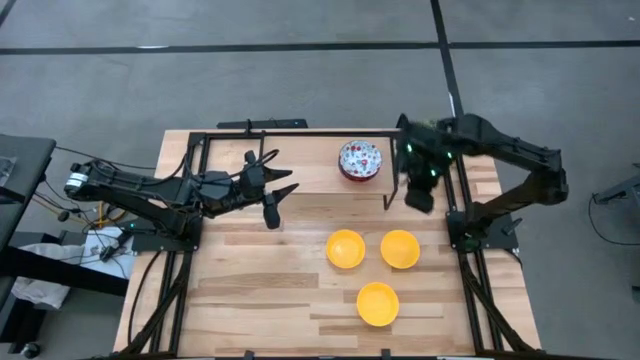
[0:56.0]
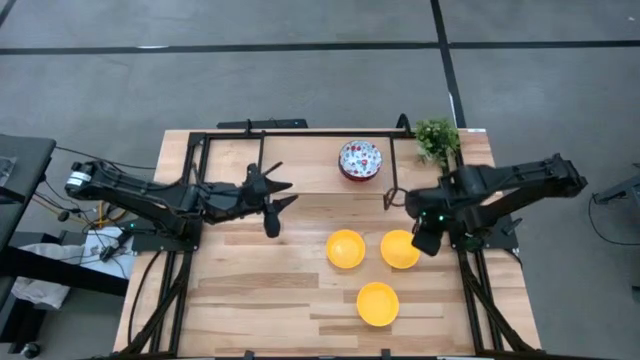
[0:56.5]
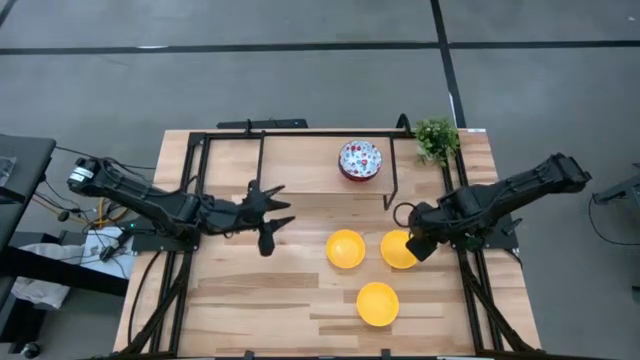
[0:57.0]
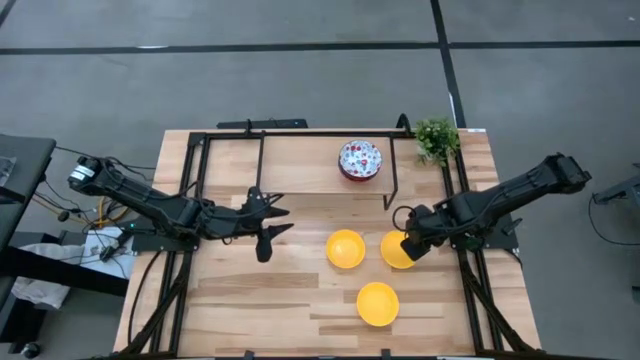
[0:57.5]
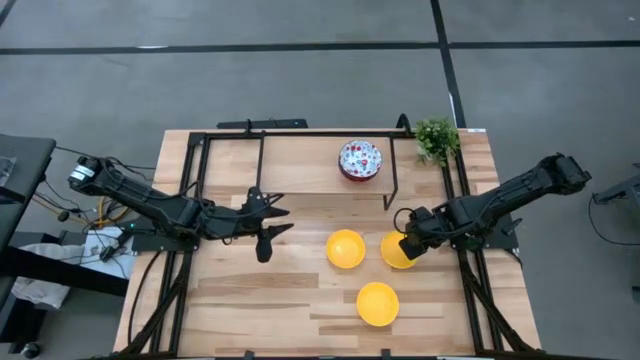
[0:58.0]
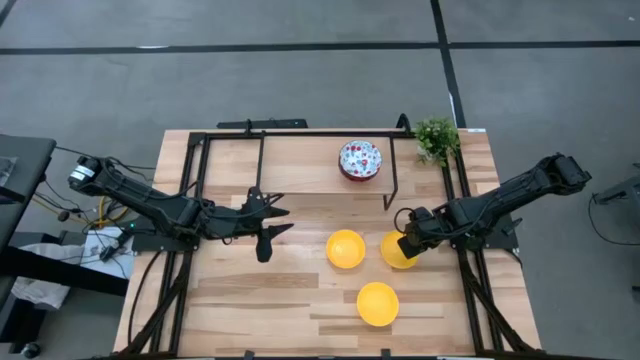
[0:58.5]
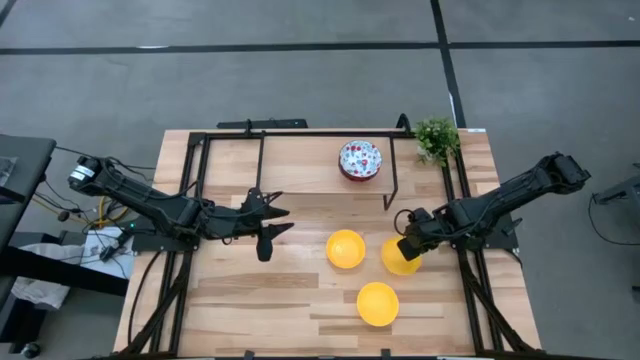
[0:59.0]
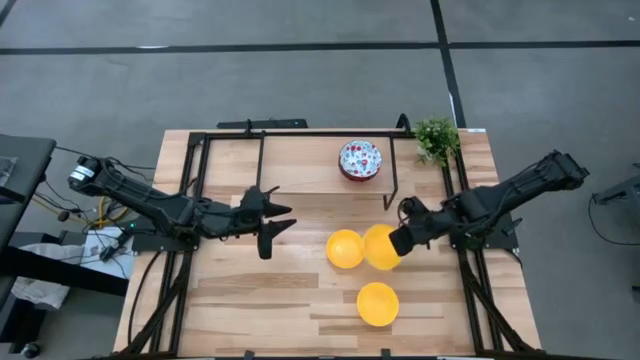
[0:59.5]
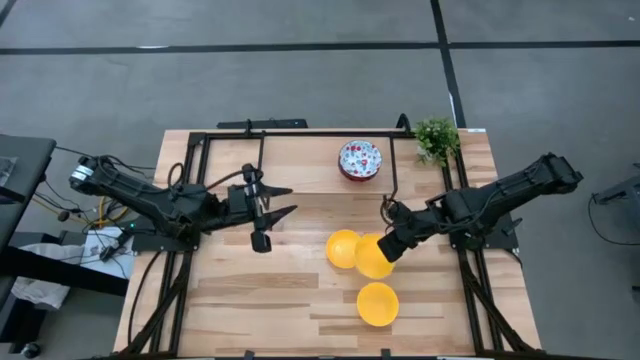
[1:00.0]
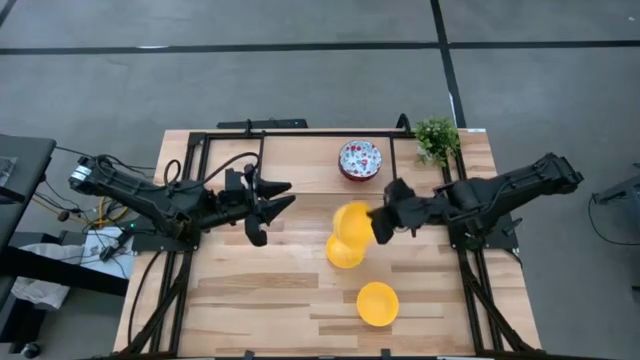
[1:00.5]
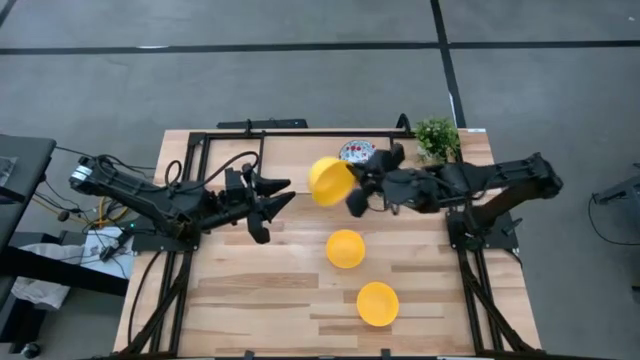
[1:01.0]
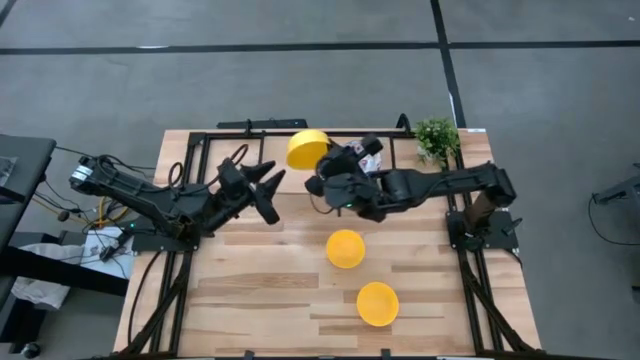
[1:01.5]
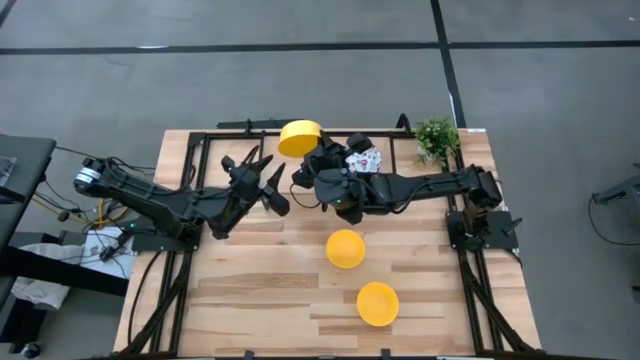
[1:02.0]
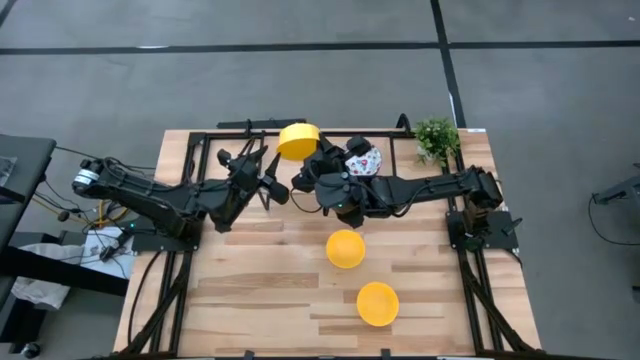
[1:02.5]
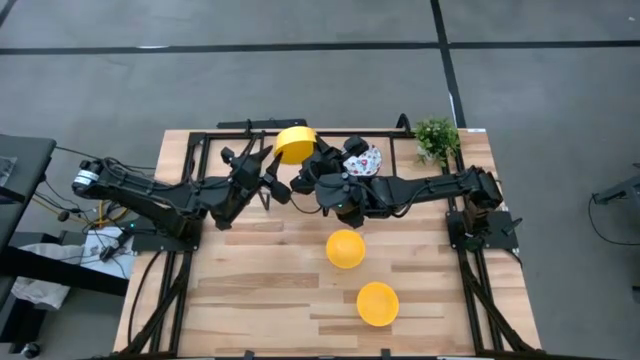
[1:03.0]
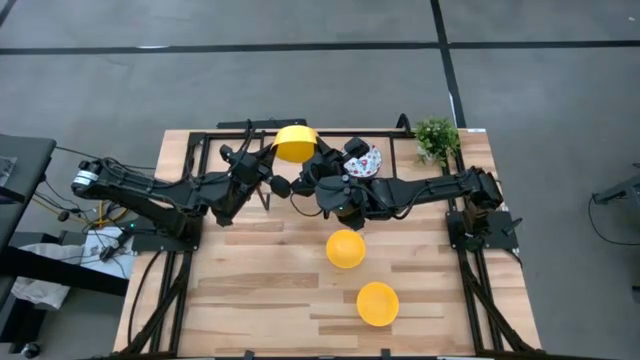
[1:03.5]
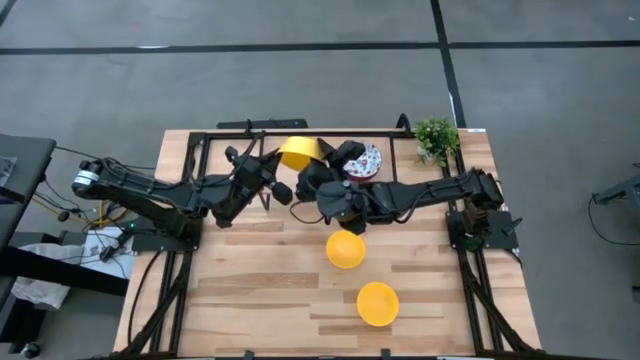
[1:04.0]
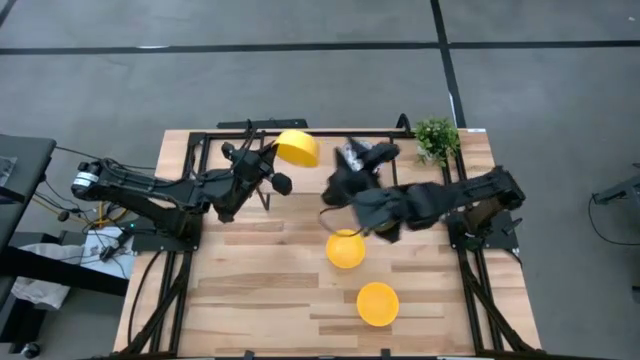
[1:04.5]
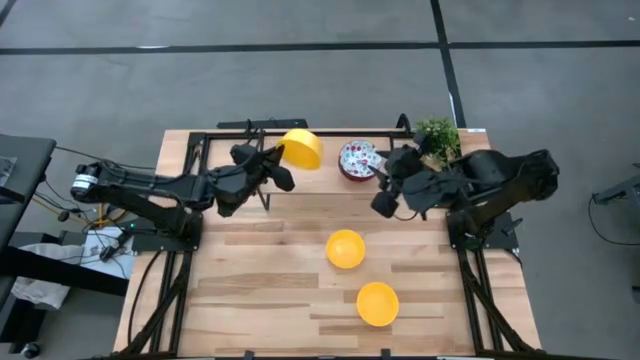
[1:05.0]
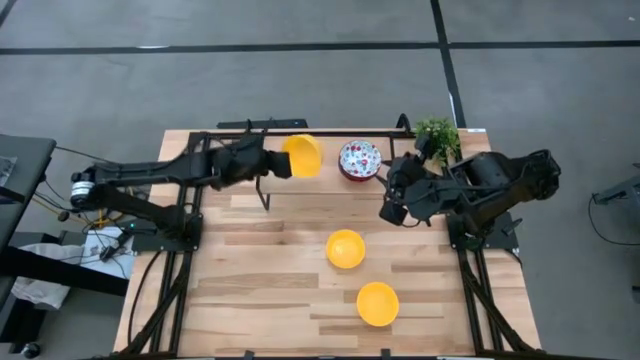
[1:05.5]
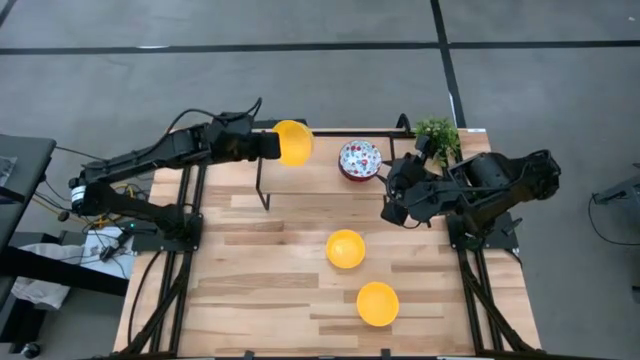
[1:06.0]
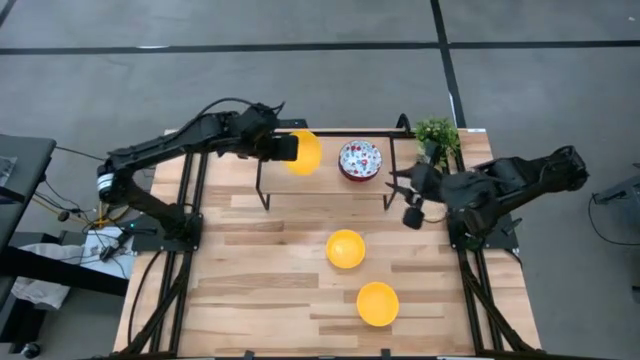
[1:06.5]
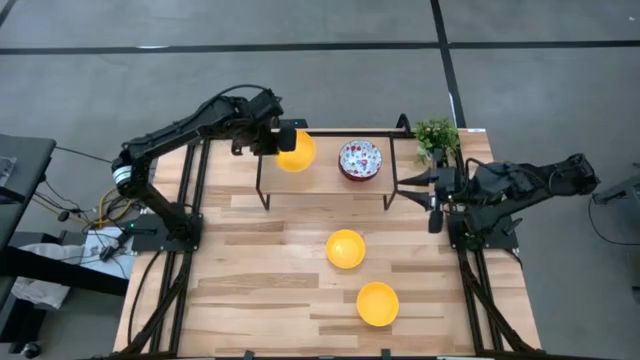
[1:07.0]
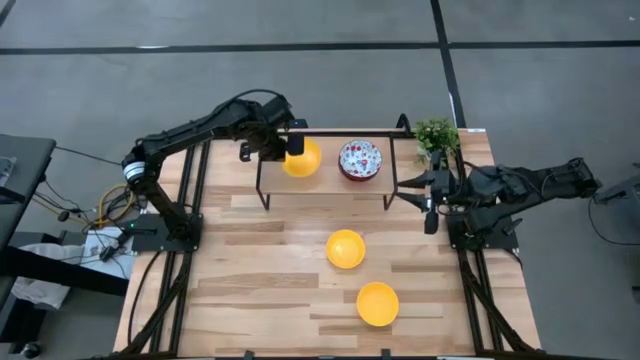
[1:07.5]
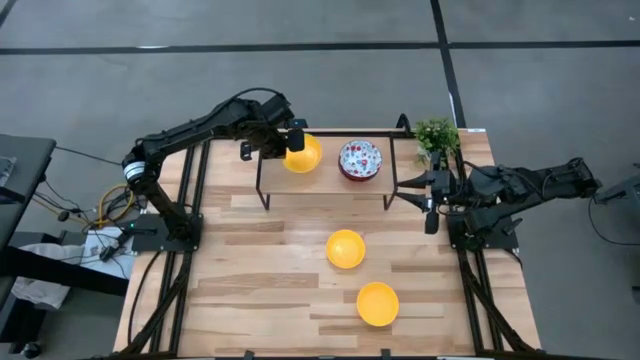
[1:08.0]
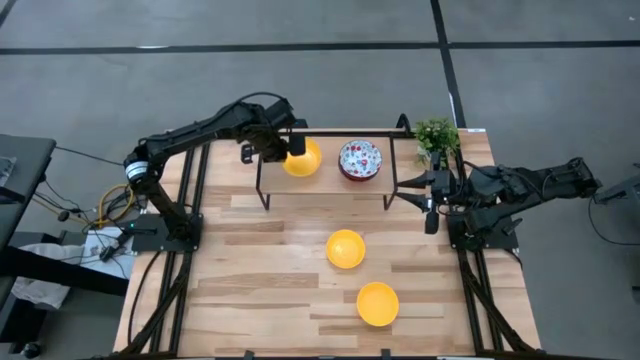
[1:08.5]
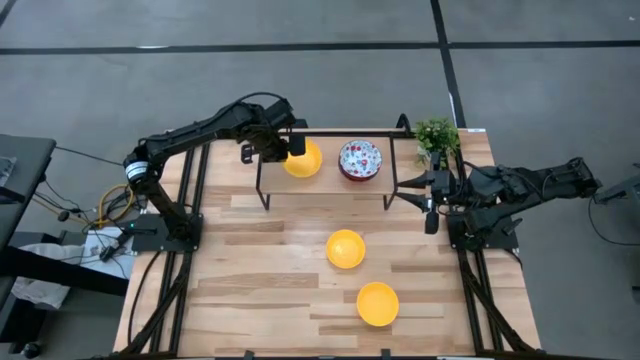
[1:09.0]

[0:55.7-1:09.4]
Task: Pick & Place Mini bowls
Put the right yellow bowl on the shelf

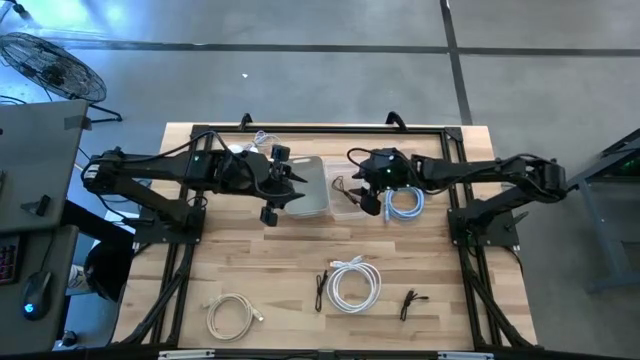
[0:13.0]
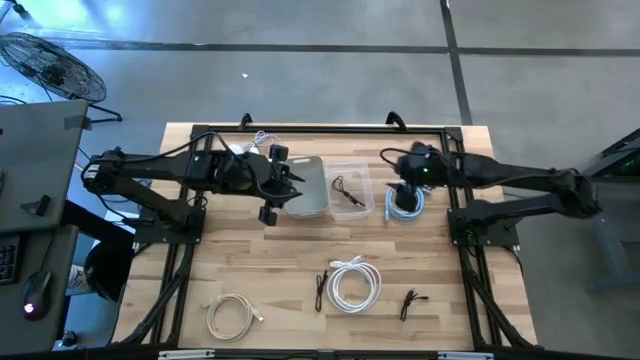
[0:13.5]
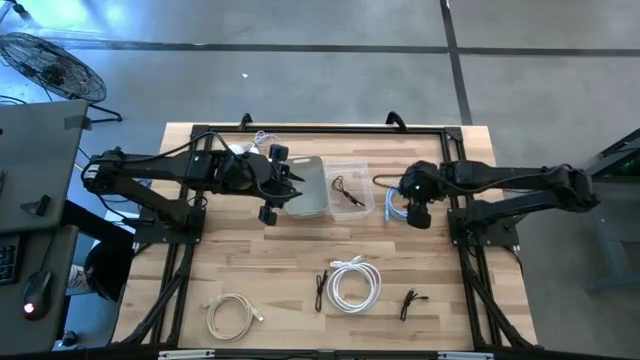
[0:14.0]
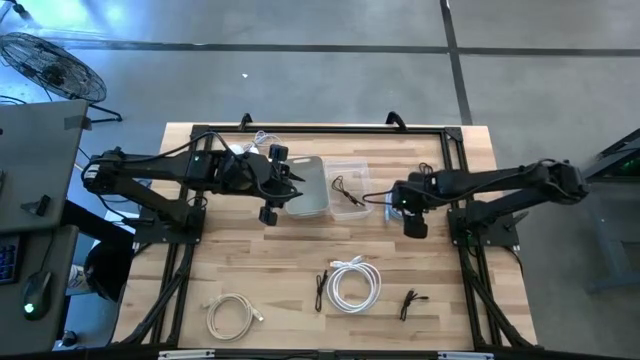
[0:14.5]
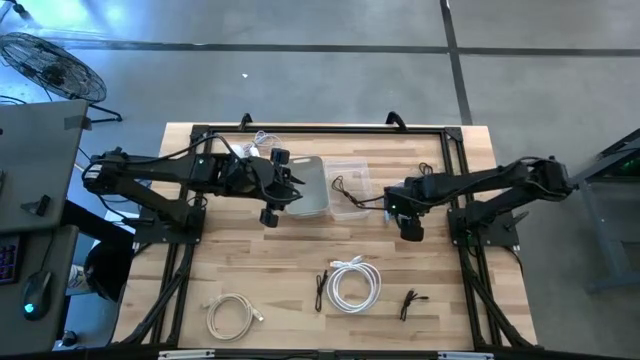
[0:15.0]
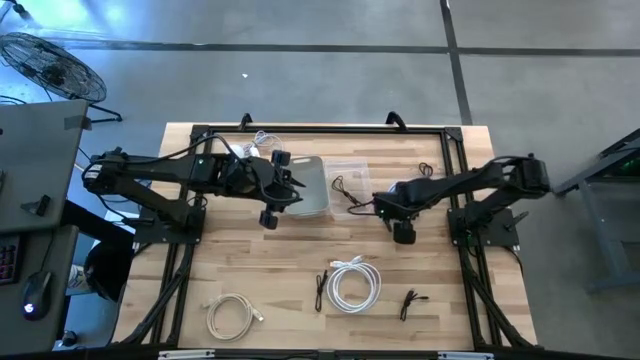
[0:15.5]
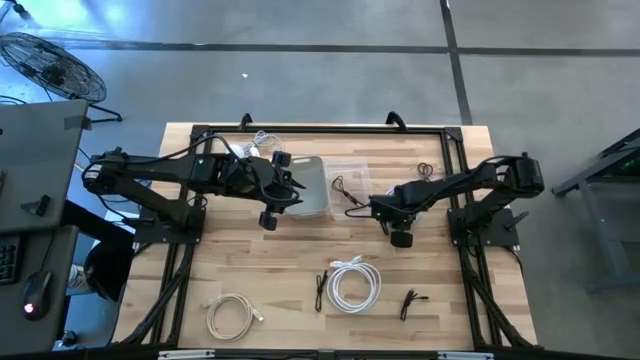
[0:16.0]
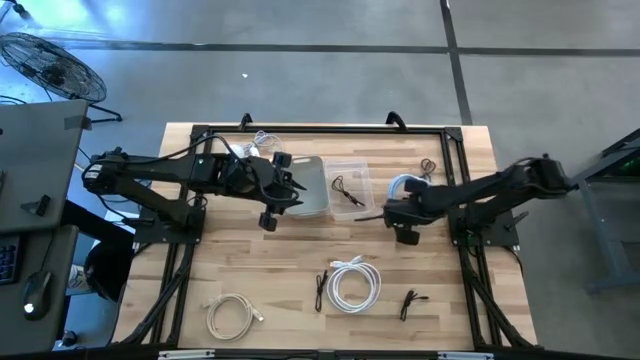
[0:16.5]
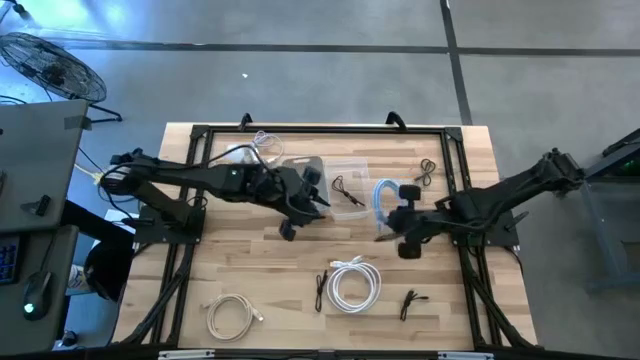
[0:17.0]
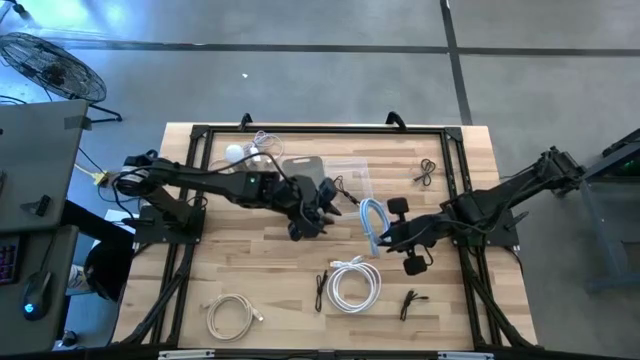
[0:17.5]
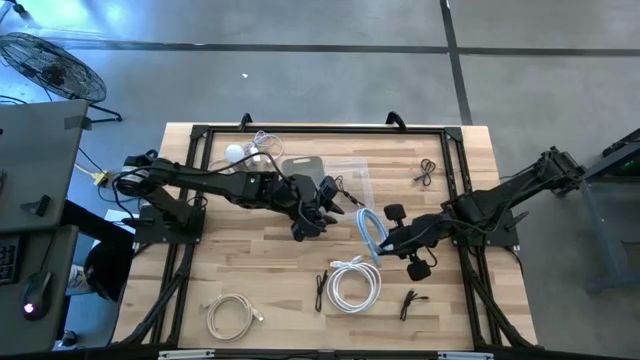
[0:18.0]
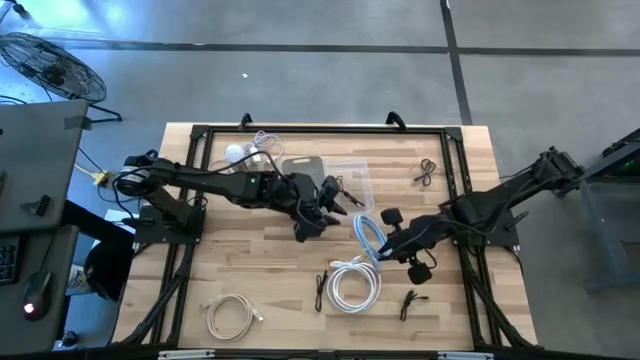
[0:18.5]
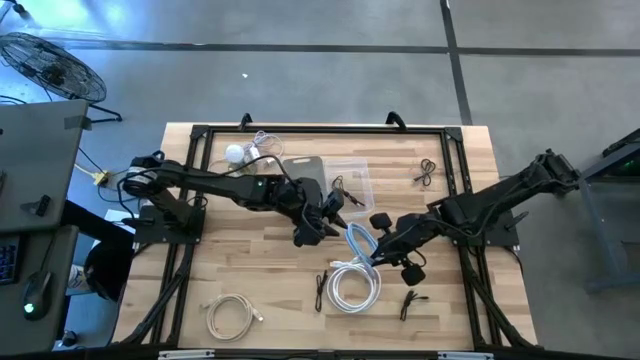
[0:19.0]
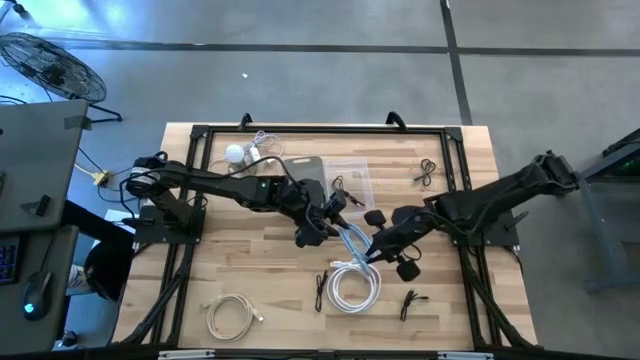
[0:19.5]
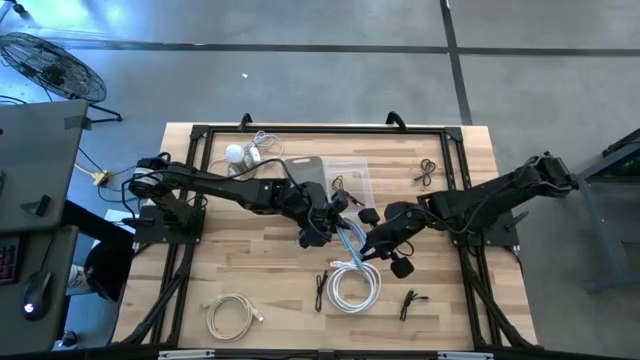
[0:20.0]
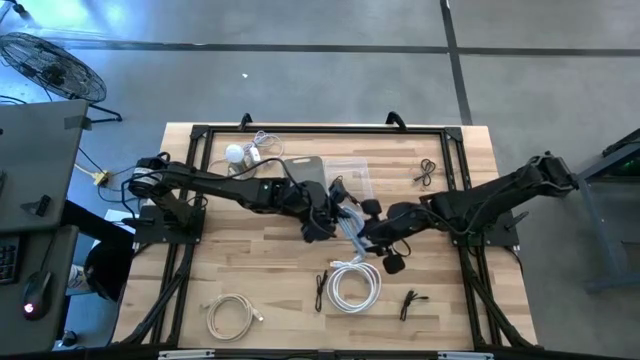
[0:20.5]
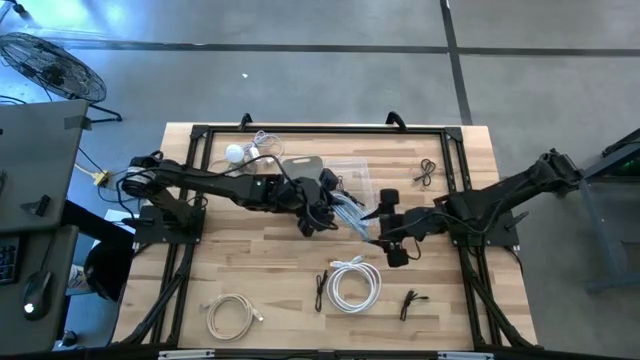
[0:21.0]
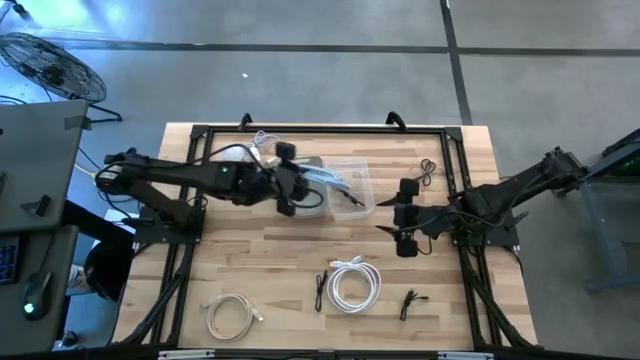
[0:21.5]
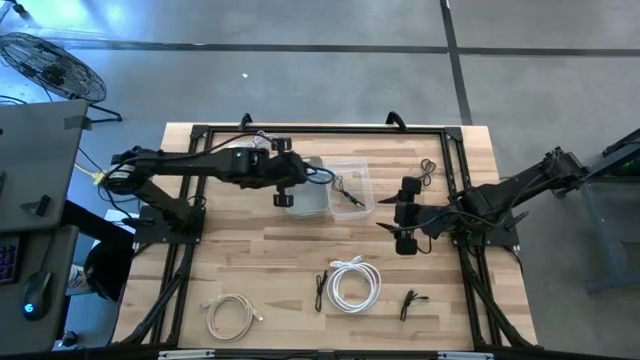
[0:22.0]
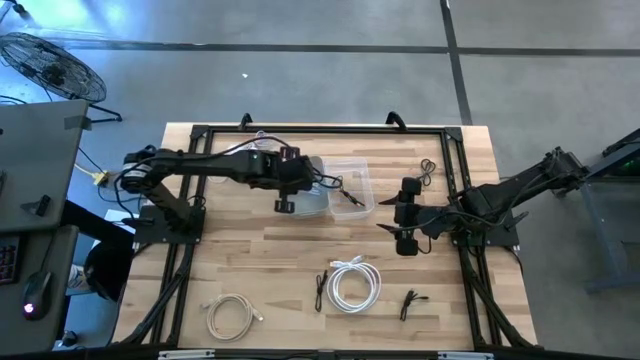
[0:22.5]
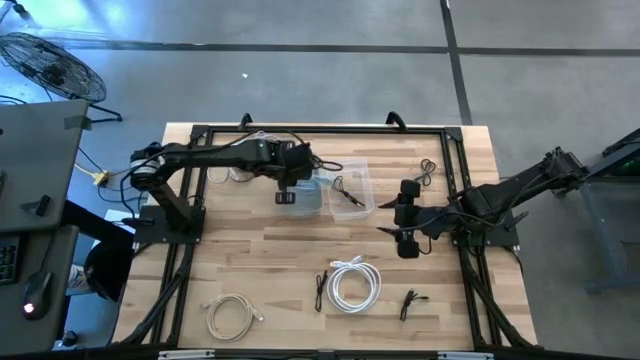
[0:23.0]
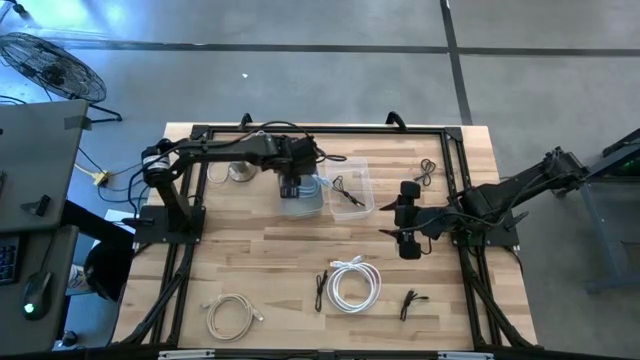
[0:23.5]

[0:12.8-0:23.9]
Task: Pick & Place USB Port
Put the blue HDMI cable into the gray bin
